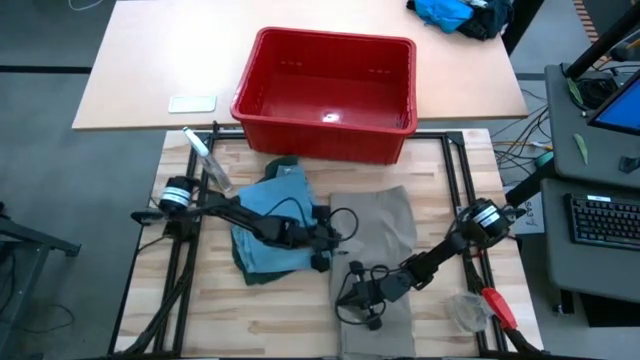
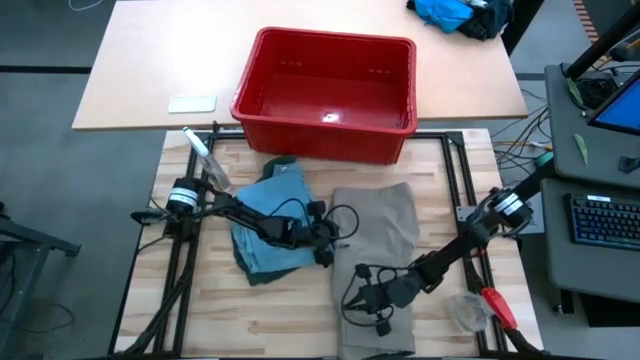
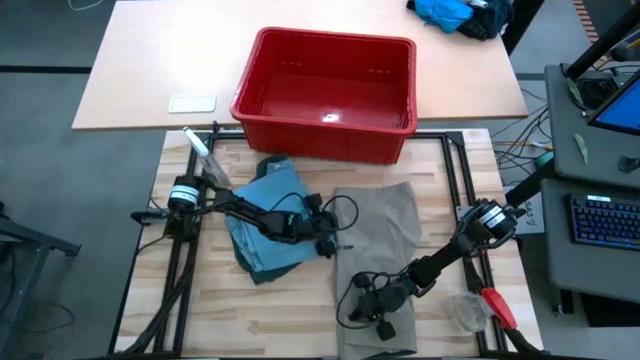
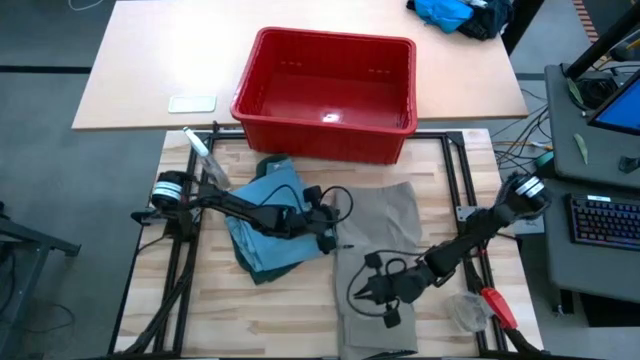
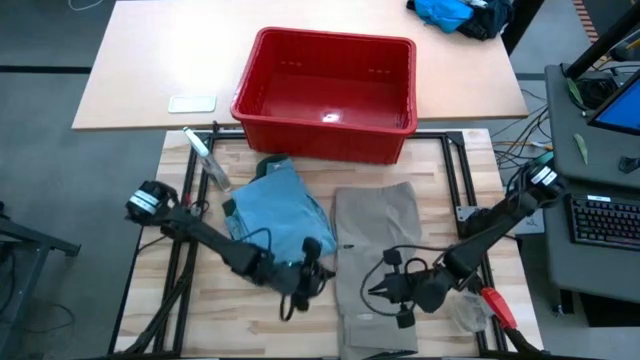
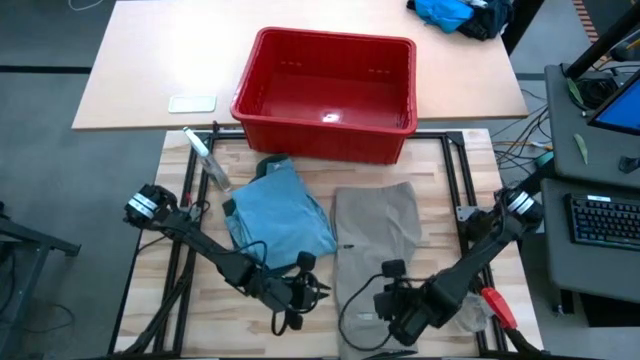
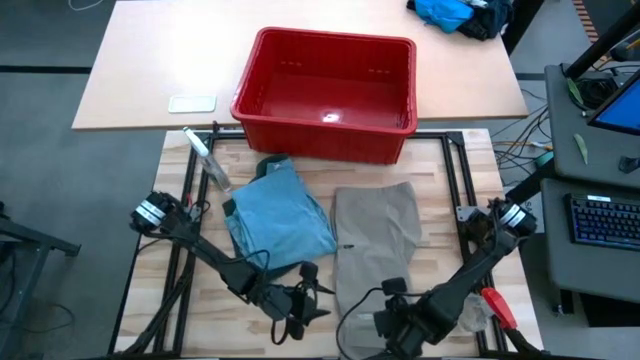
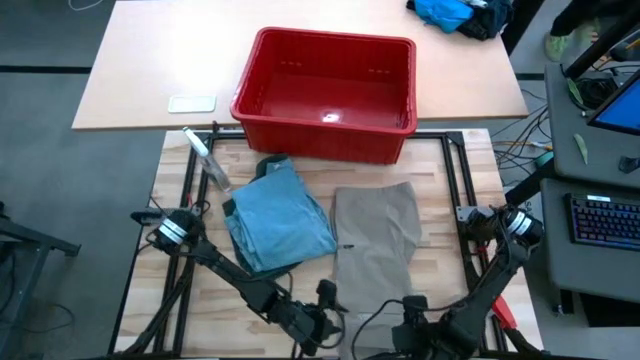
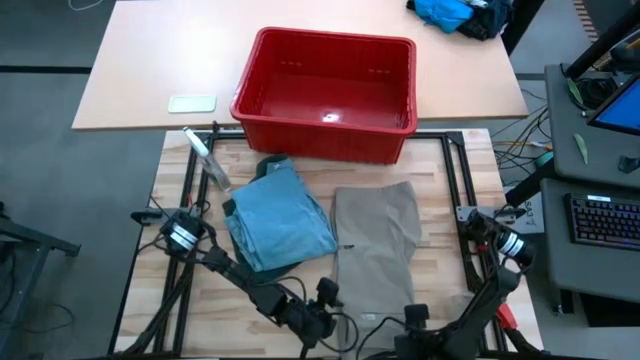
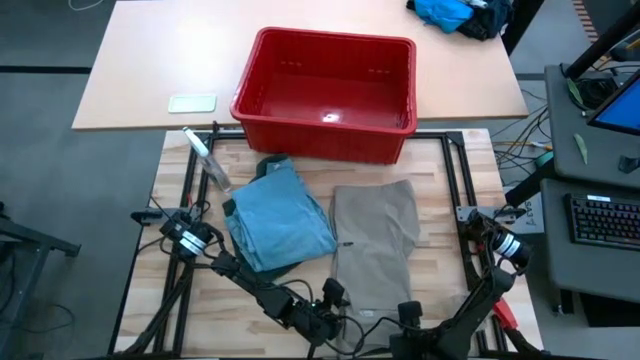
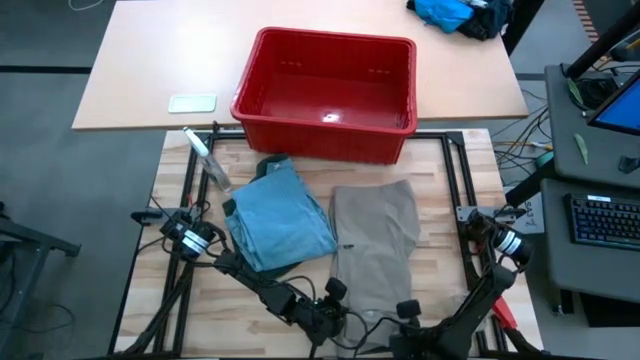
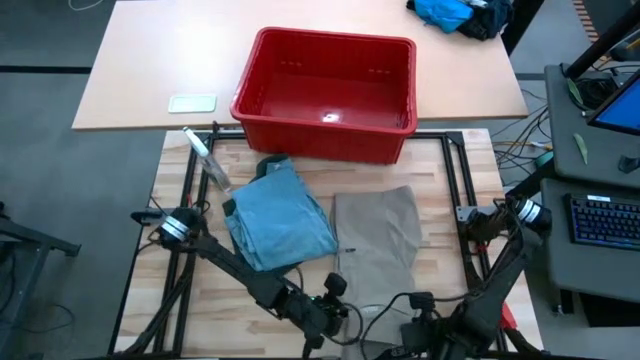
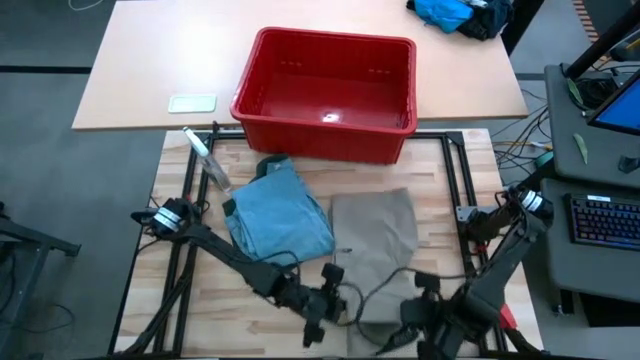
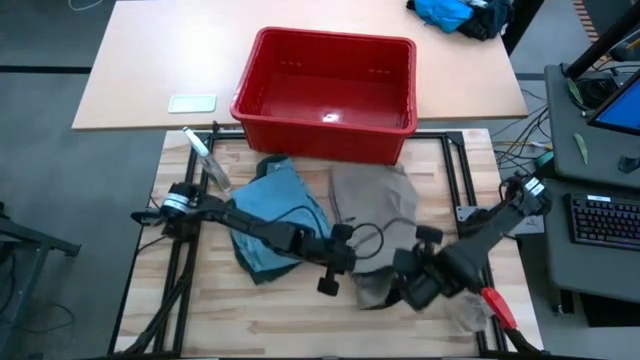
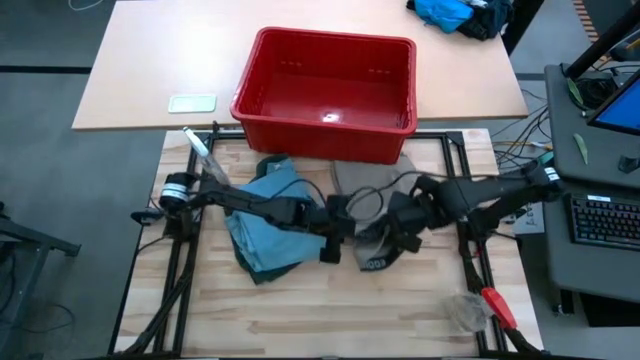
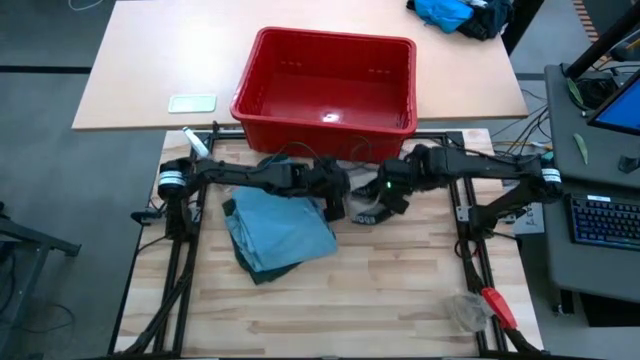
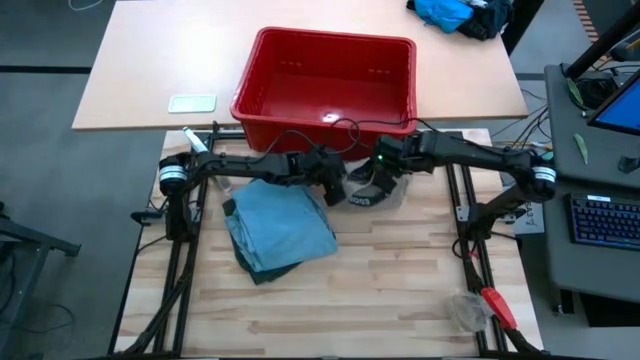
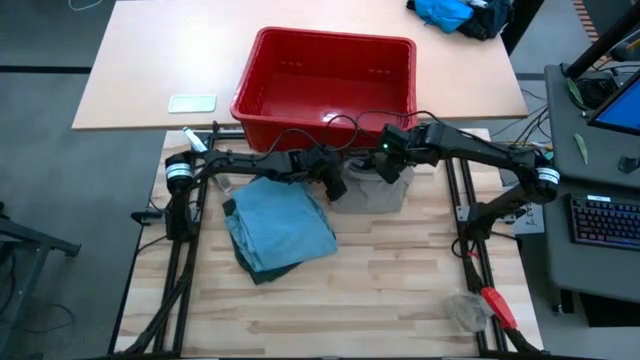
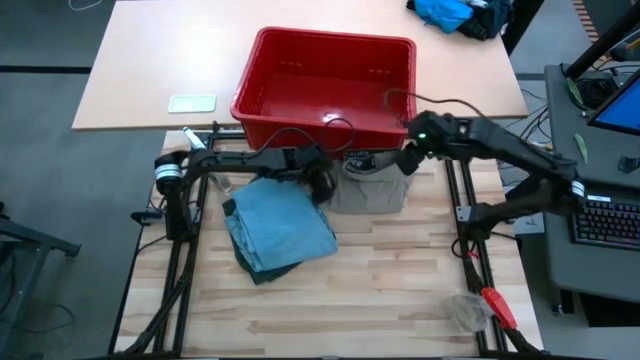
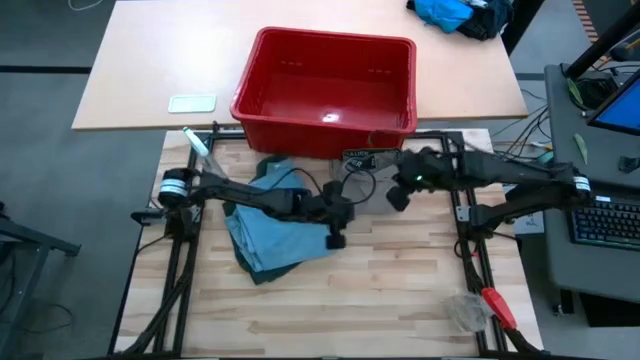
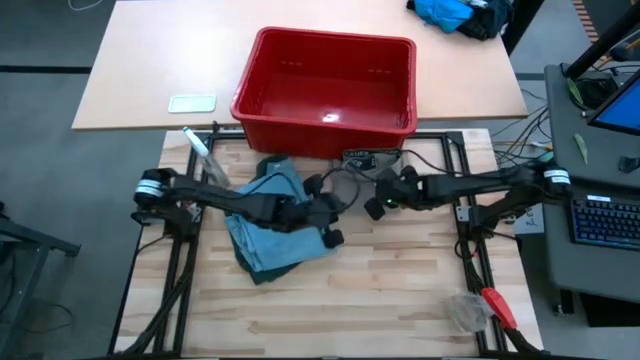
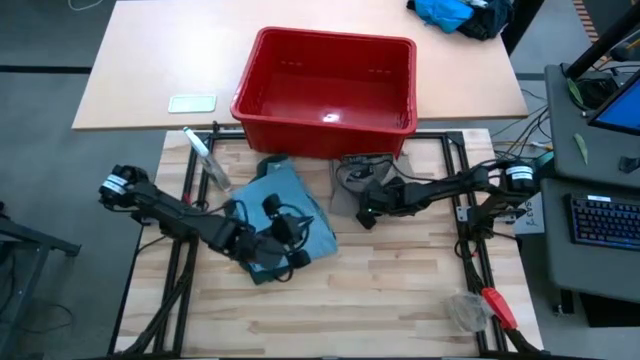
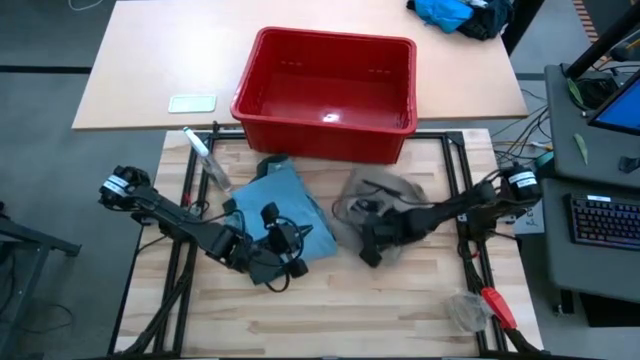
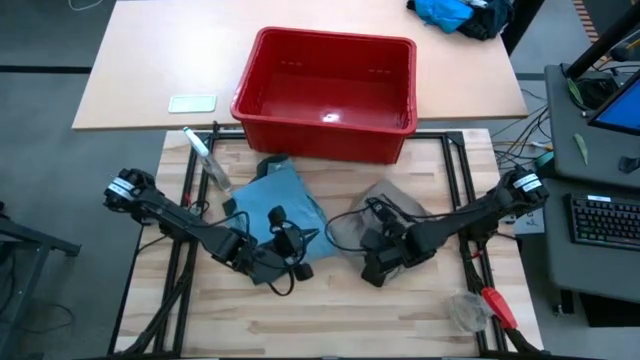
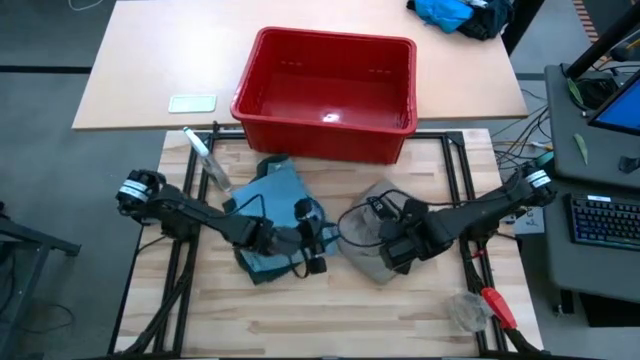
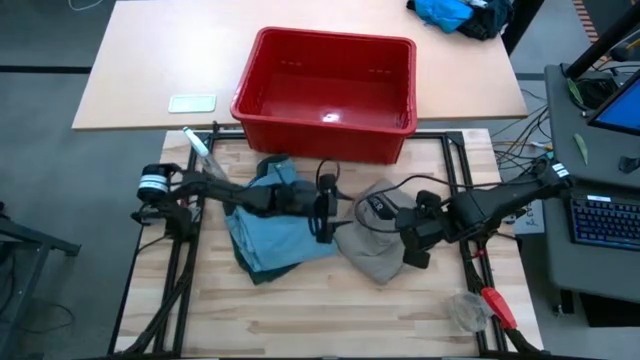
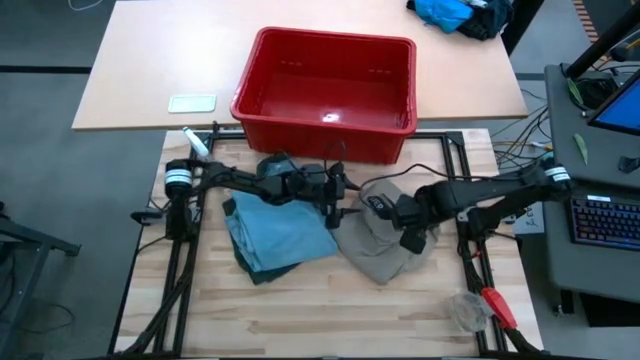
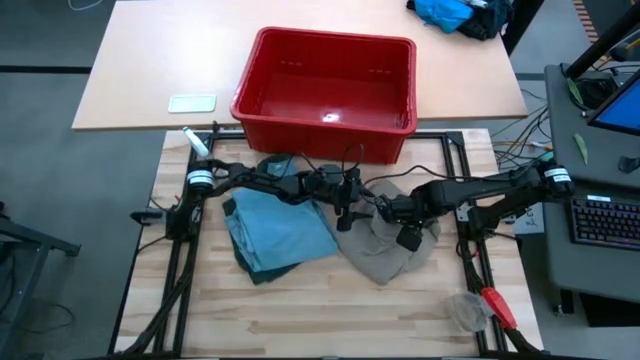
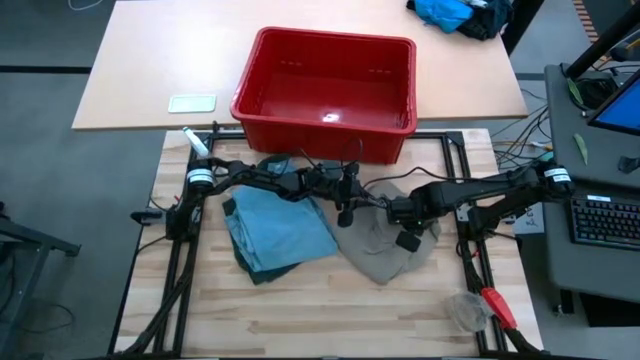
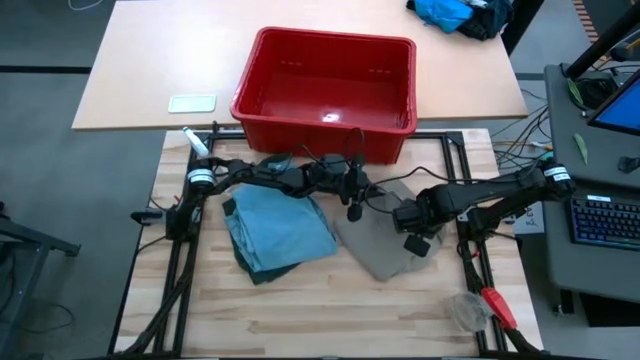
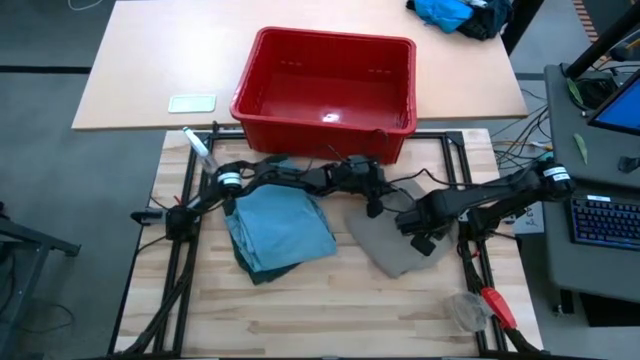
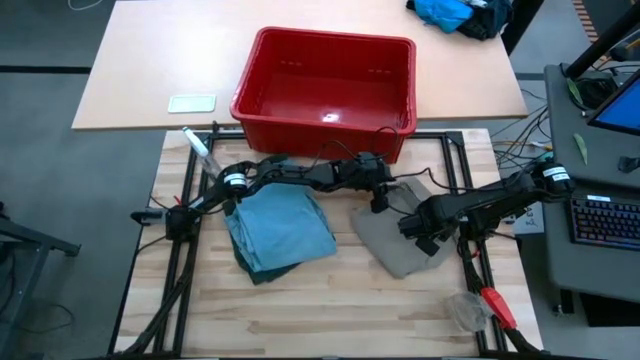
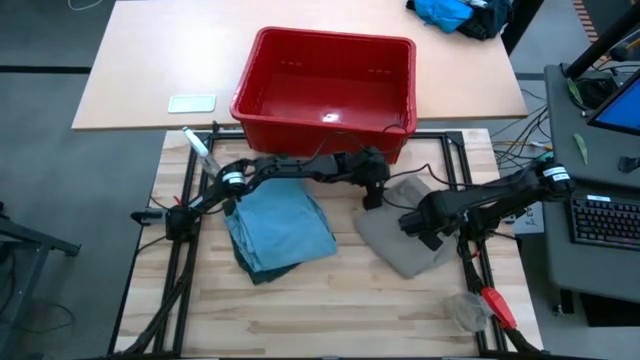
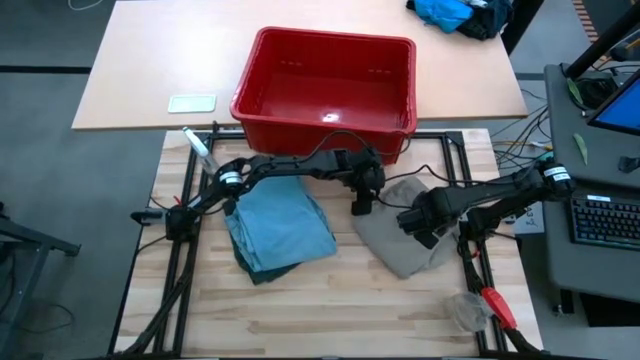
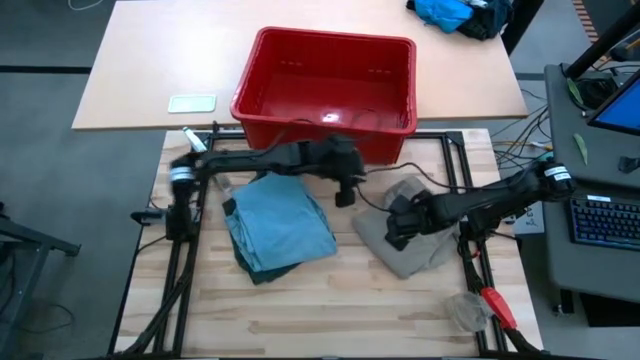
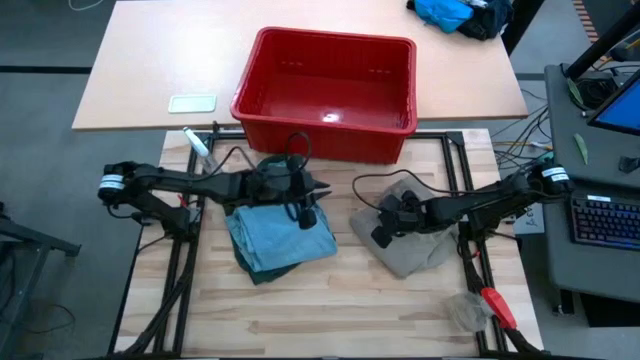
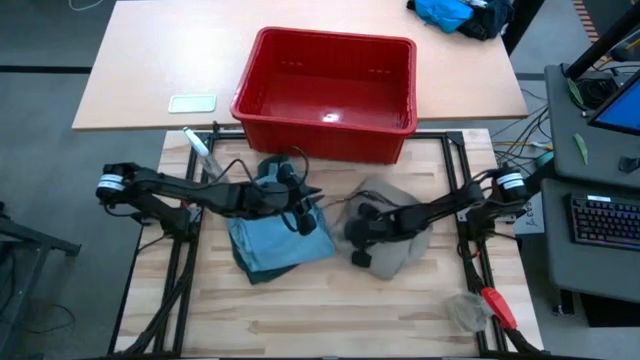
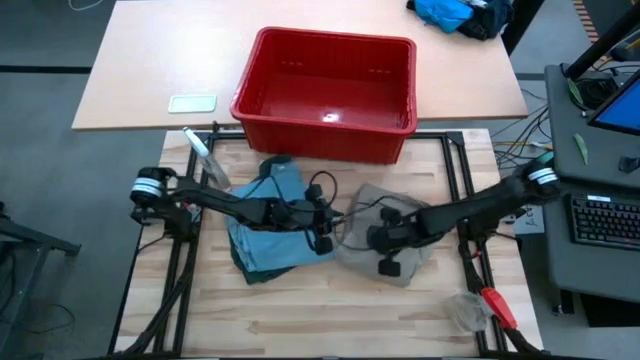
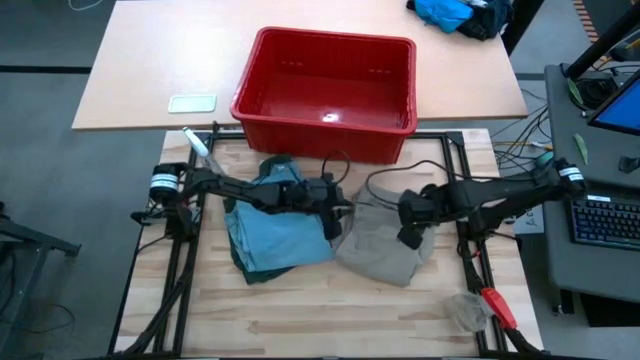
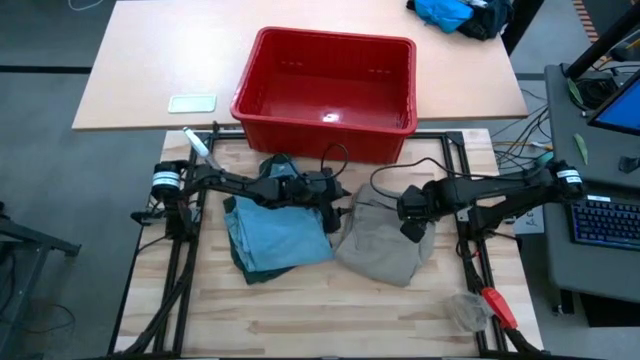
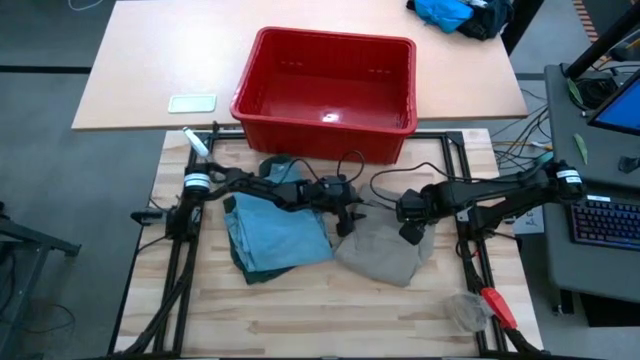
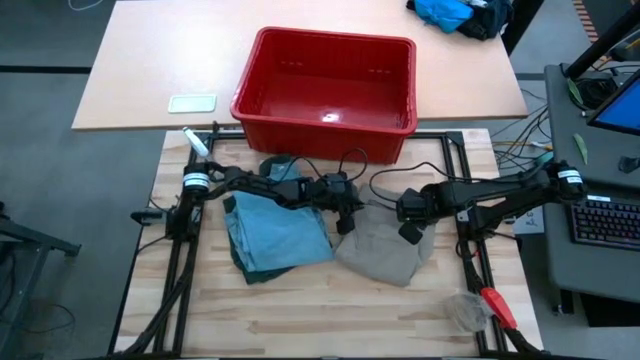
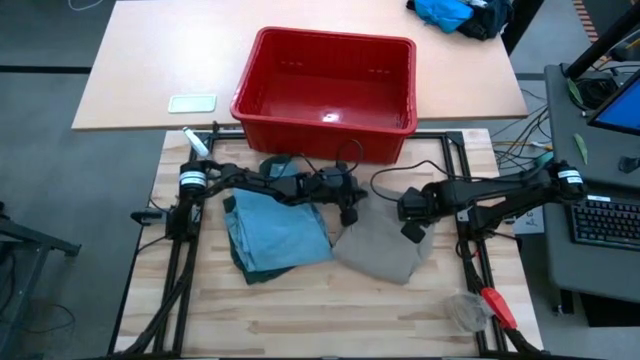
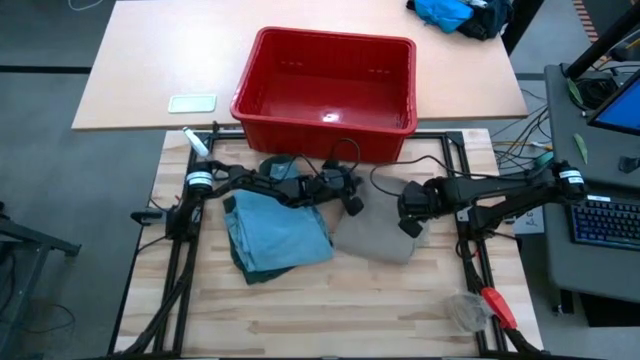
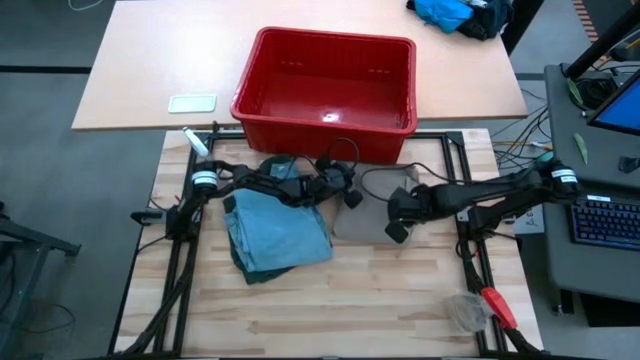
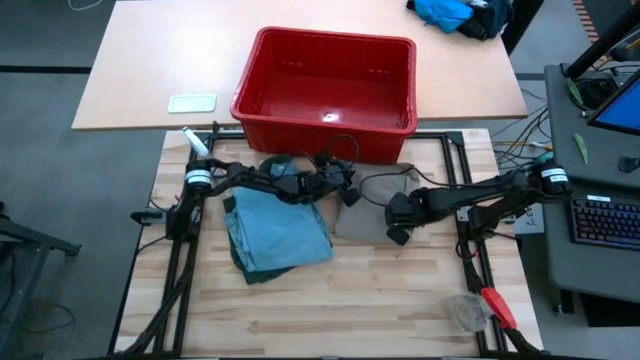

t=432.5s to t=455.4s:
Task: Fold Laundry from Bin
Fold the light brown shorts
